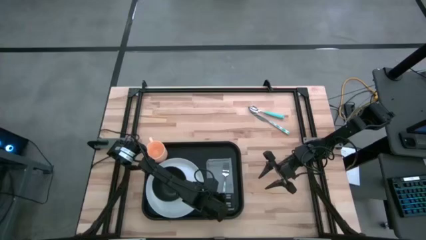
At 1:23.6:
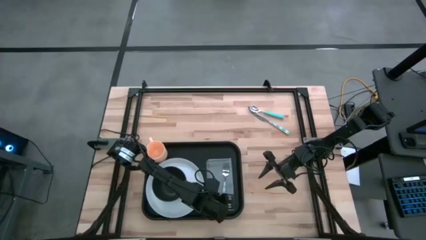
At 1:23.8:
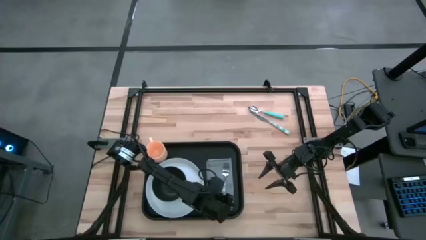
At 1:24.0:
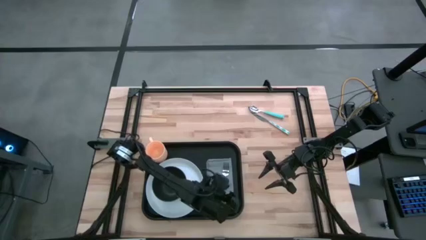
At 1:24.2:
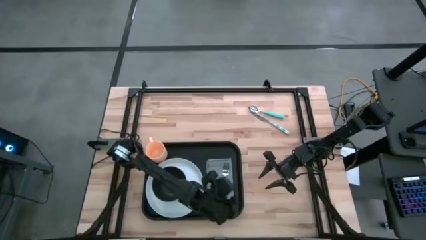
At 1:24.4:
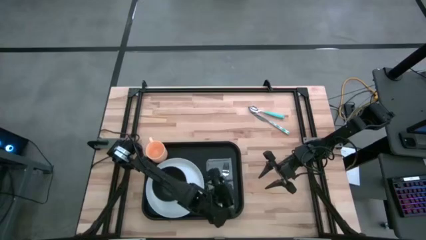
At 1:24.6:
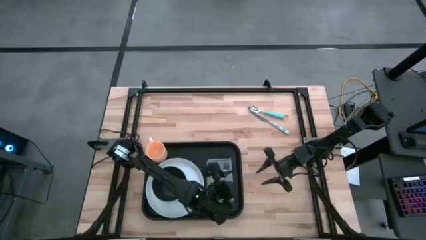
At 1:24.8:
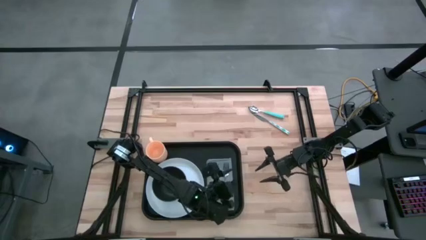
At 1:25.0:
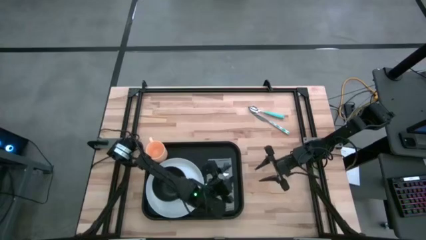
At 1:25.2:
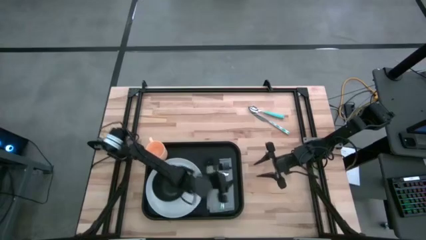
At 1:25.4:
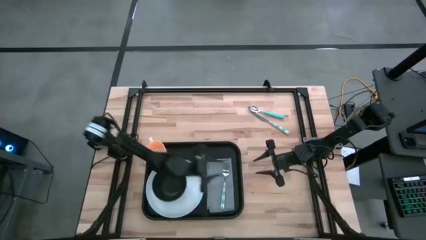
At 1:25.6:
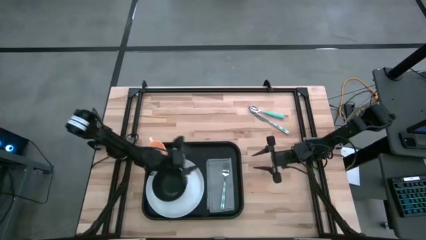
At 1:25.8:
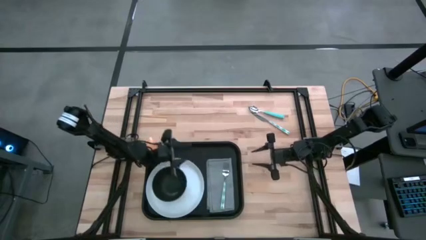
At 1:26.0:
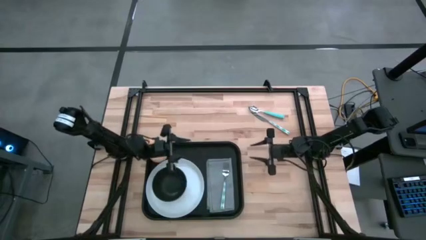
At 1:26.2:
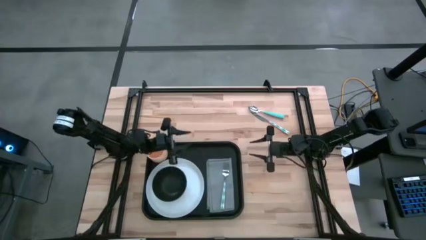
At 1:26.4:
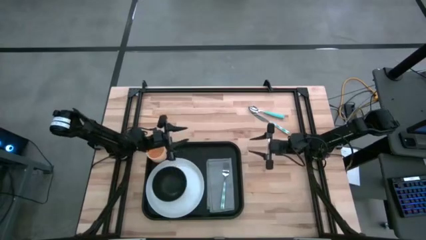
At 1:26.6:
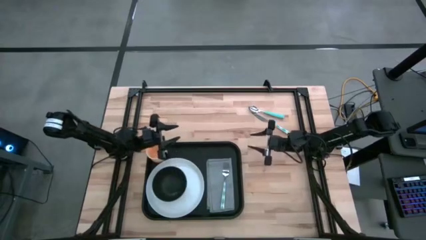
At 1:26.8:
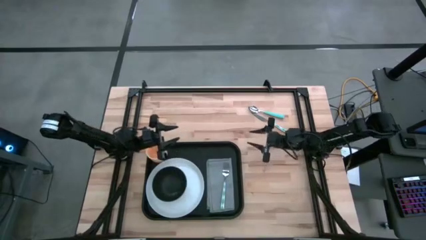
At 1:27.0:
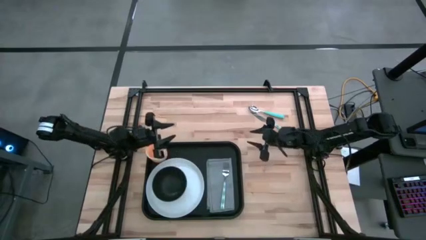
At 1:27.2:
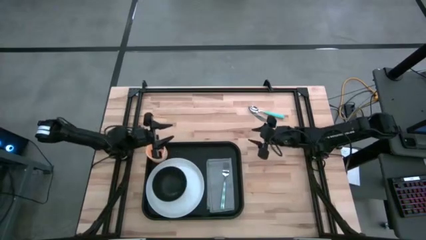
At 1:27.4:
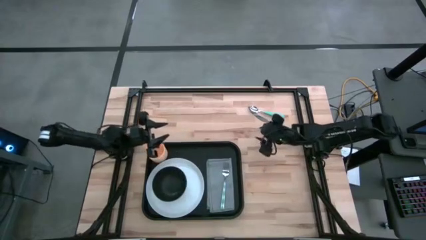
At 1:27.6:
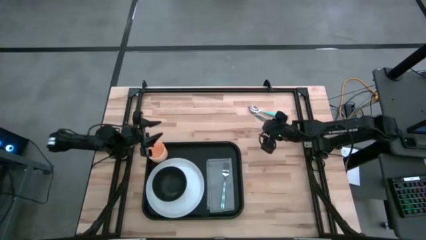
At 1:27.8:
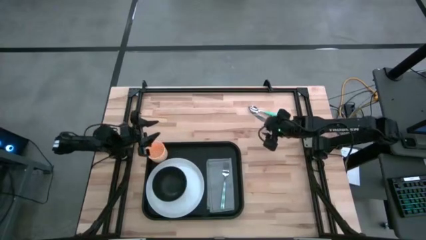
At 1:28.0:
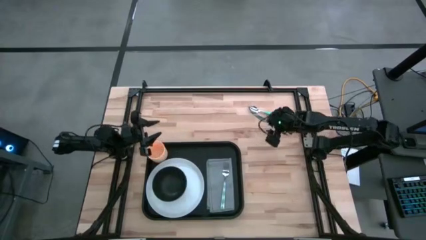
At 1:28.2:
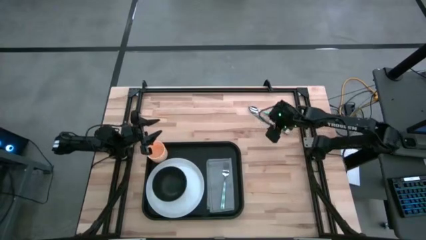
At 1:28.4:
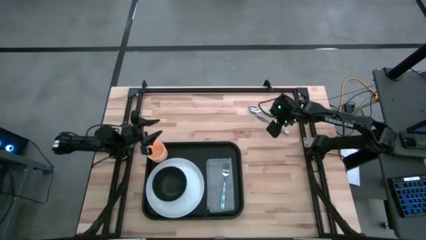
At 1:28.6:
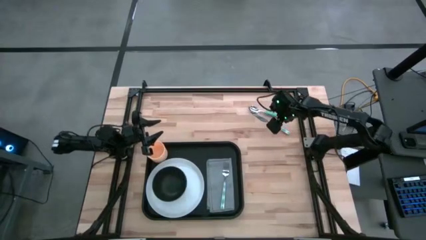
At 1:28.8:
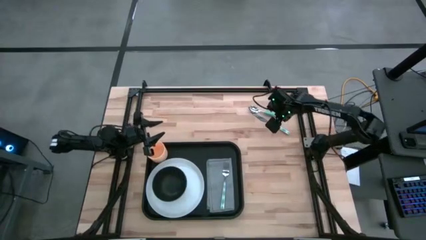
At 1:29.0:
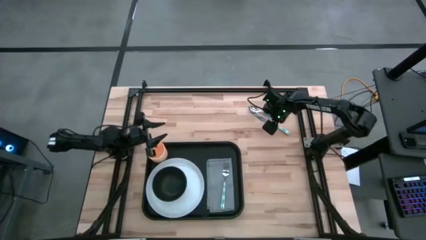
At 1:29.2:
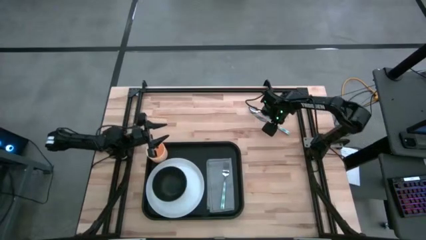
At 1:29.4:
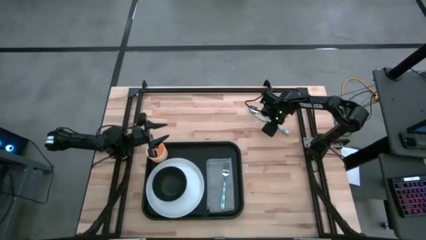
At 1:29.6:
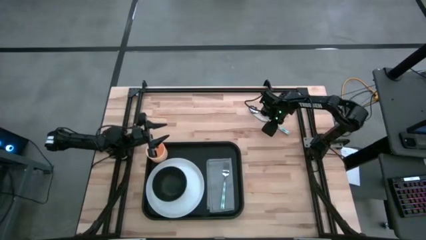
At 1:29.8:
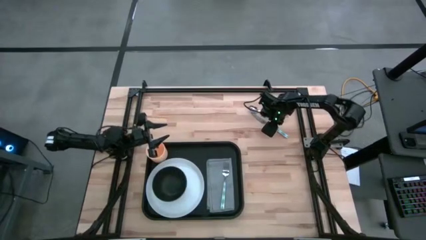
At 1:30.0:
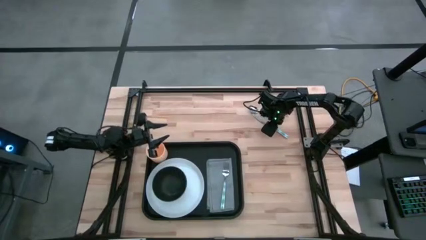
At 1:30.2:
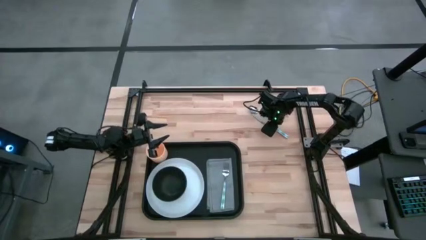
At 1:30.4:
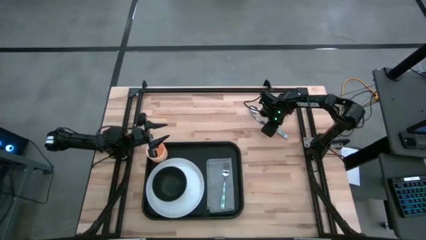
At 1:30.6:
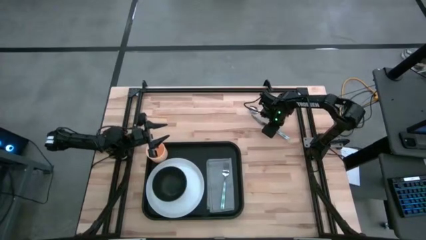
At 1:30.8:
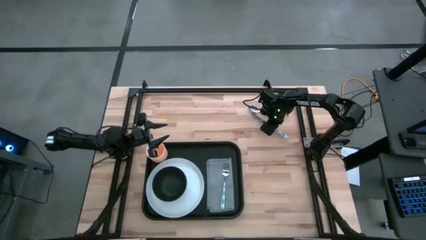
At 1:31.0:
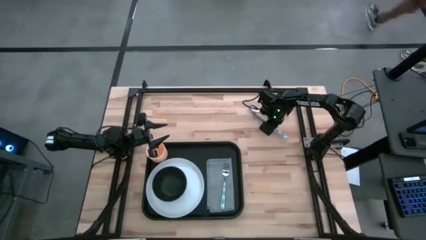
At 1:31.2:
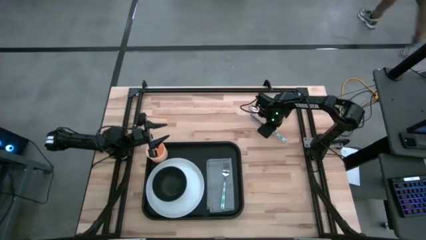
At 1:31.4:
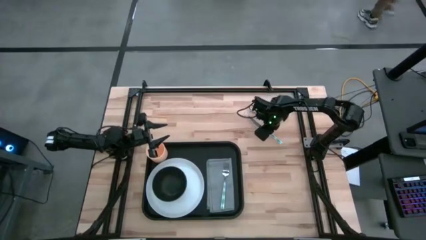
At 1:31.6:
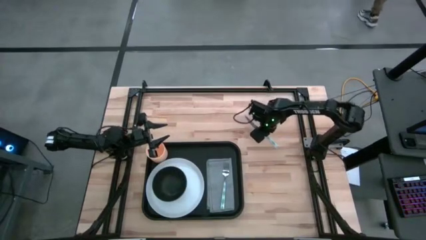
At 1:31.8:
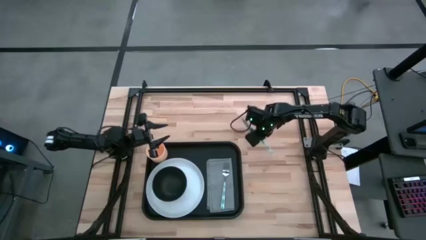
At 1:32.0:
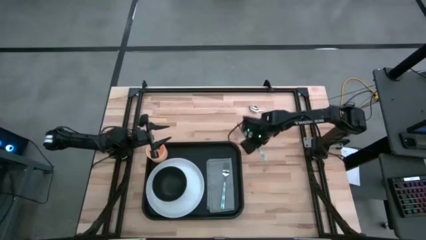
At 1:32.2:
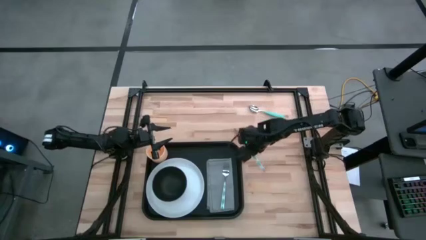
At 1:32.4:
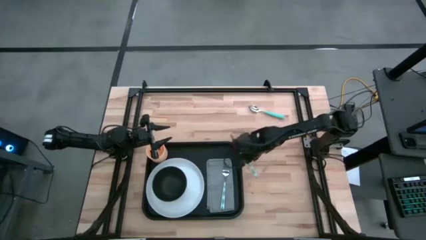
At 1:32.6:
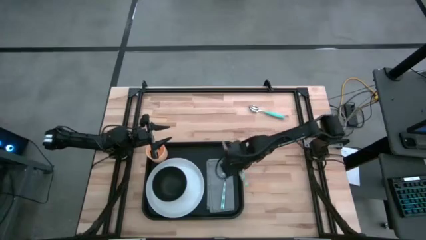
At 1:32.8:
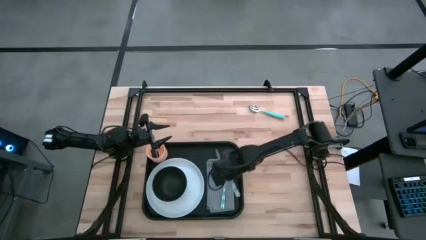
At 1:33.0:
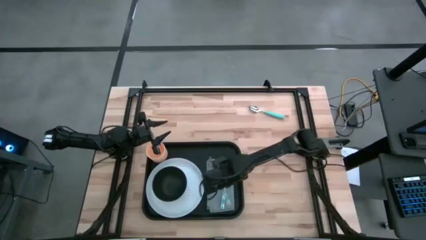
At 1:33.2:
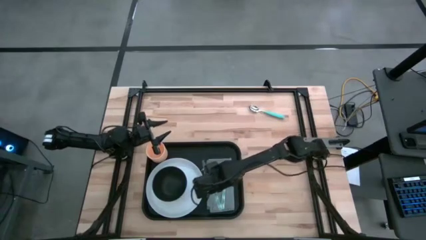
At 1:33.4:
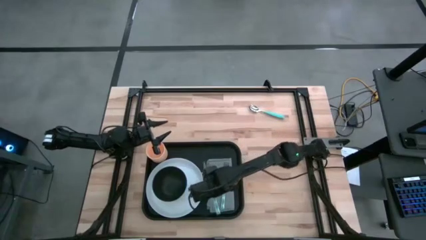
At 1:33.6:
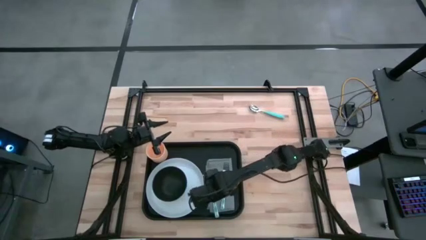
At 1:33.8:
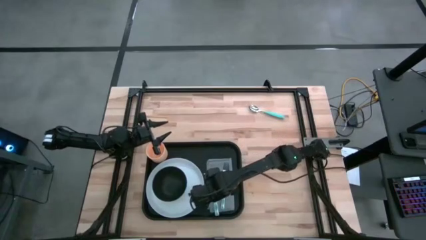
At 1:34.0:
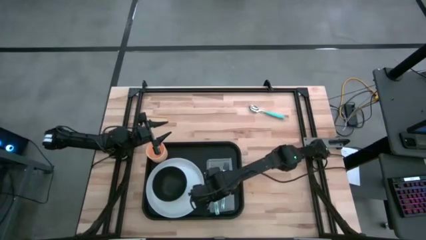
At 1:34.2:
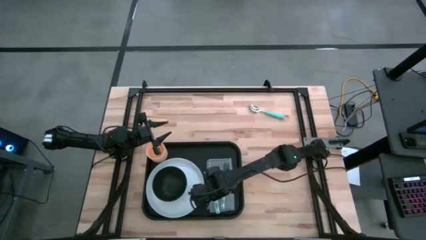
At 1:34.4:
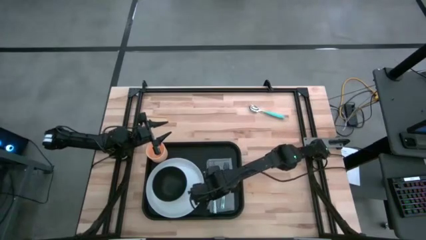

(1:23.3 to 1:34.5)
Task: Set up tray
Put the green patterned knife on the gray napkin to the left of the green patterned fork
